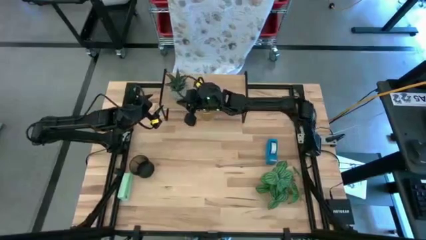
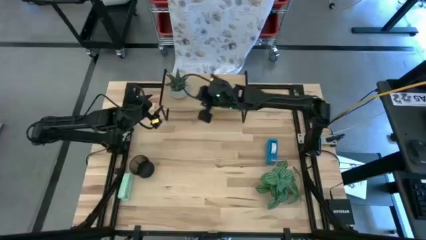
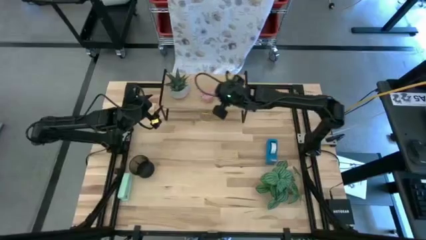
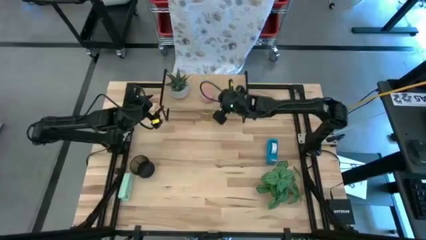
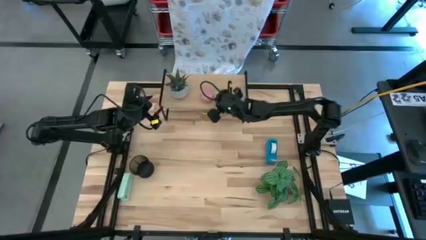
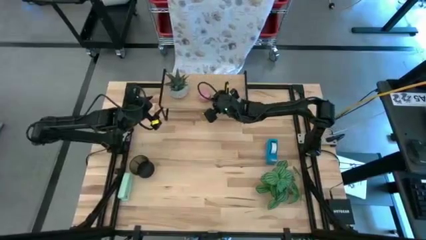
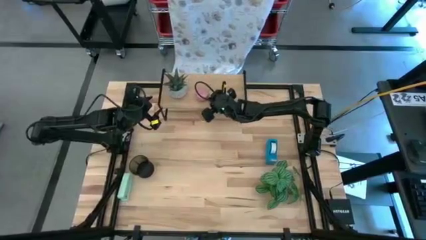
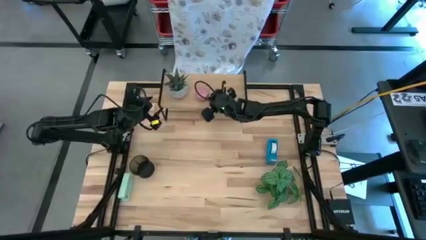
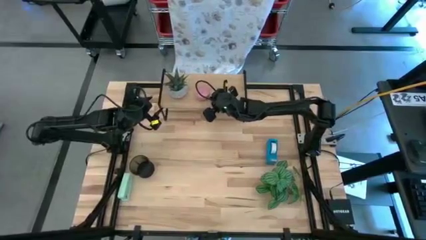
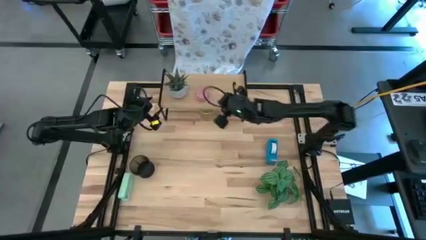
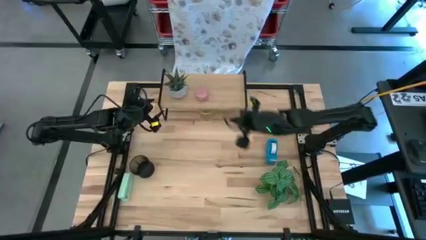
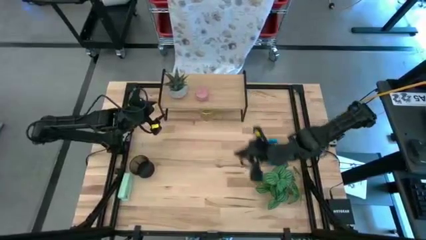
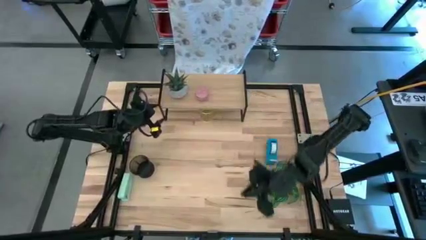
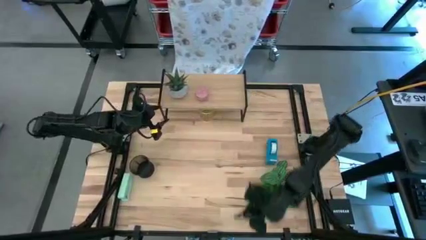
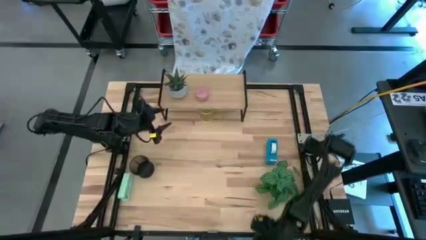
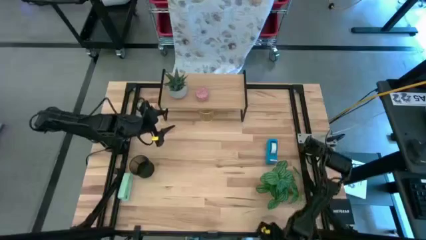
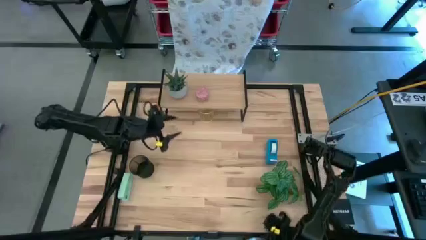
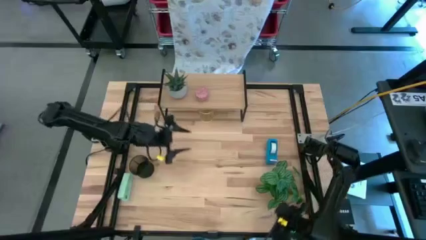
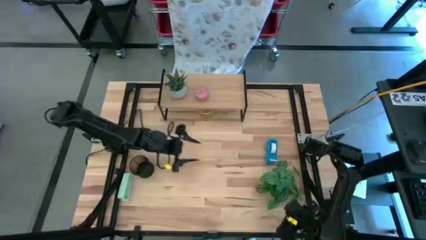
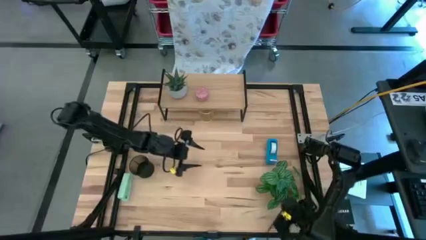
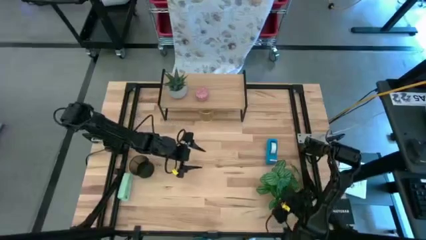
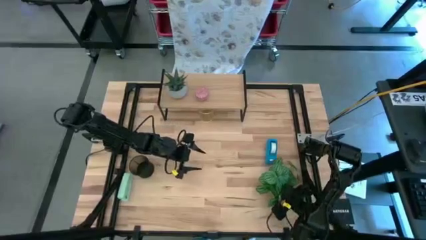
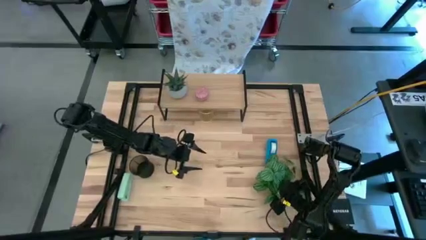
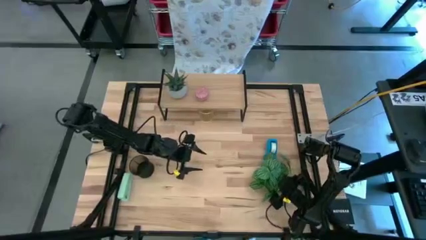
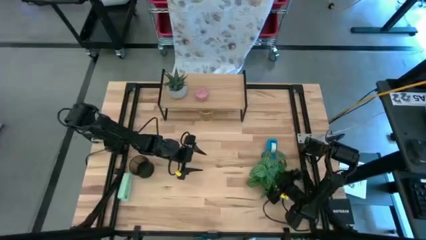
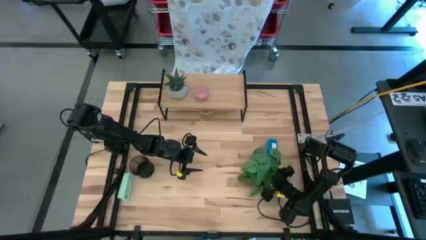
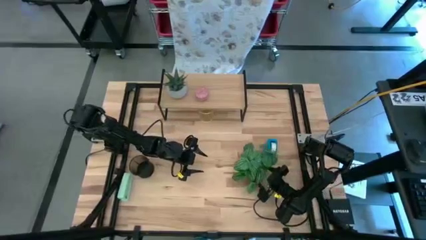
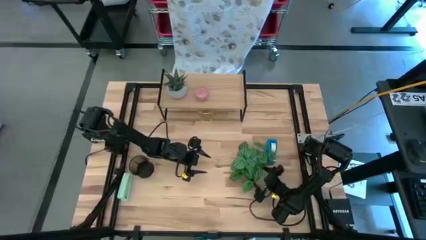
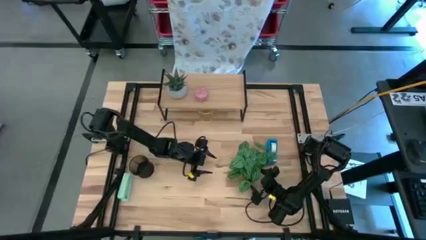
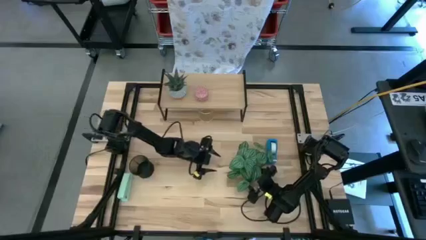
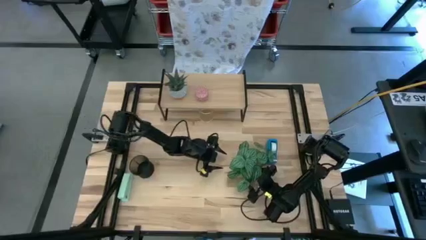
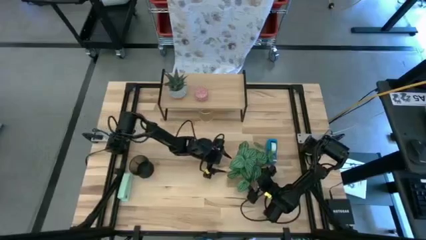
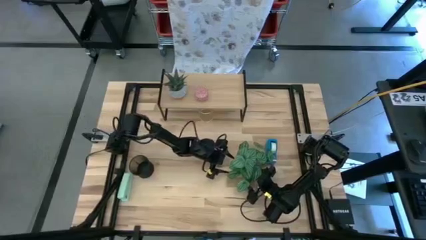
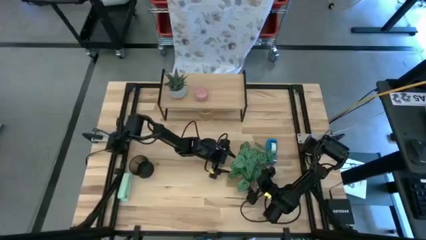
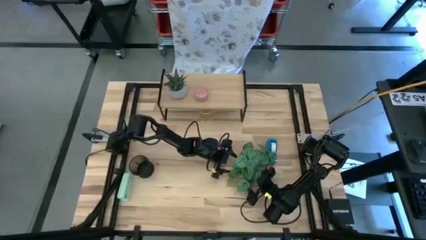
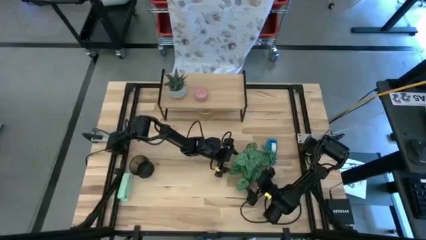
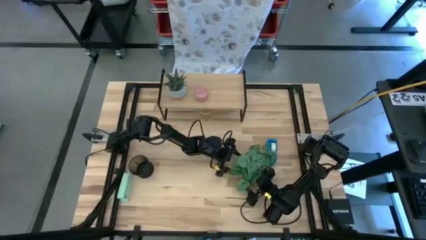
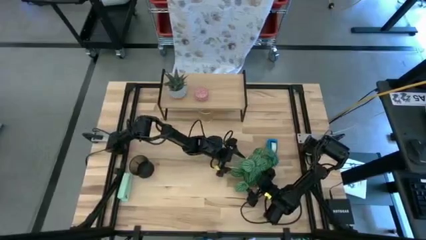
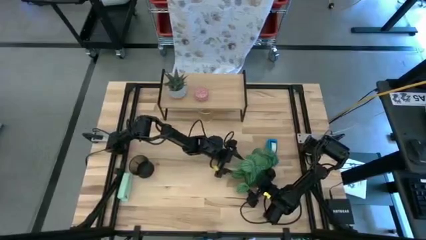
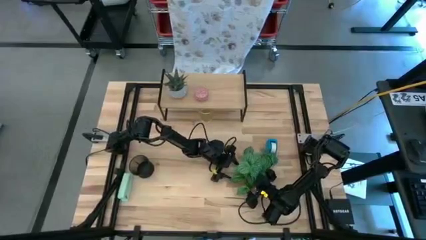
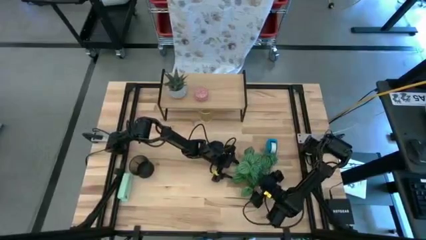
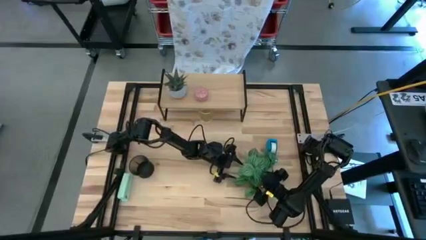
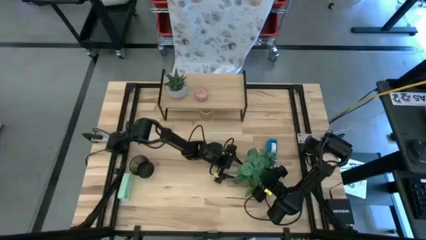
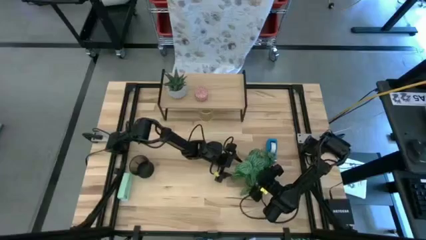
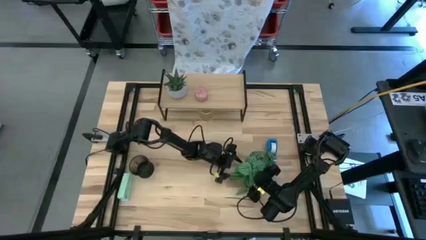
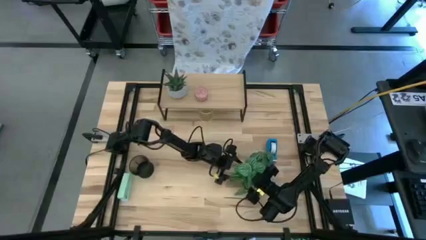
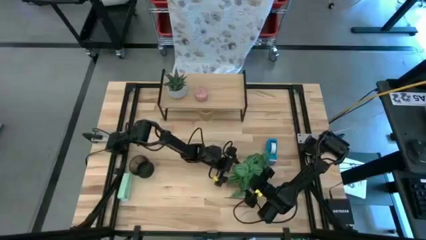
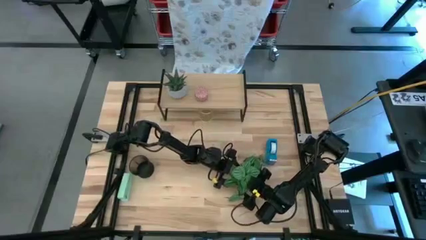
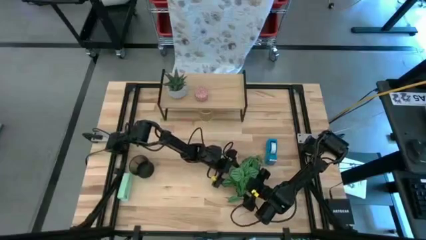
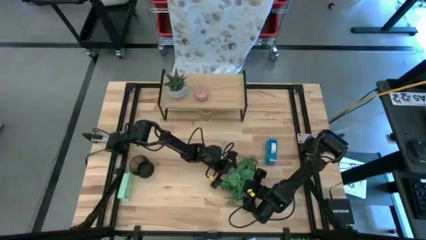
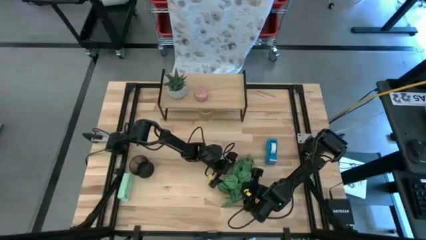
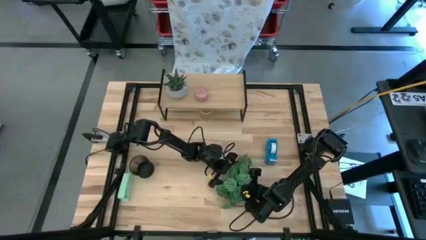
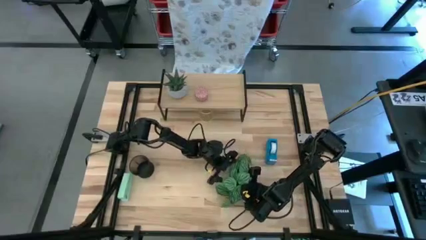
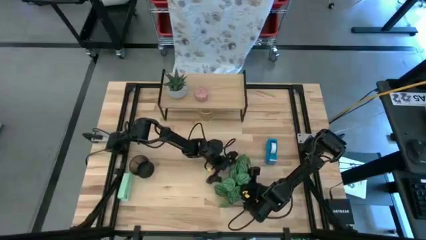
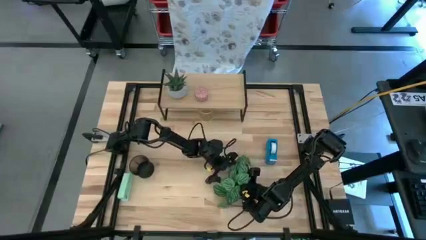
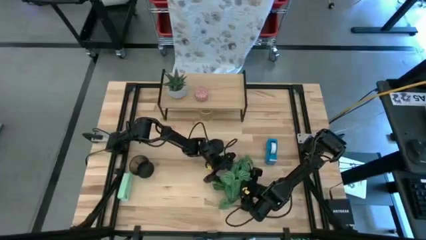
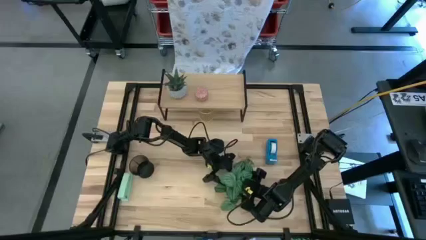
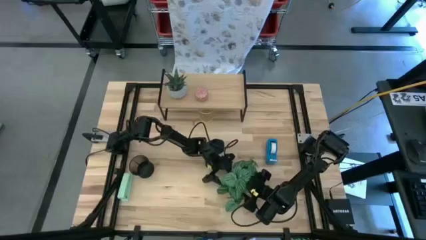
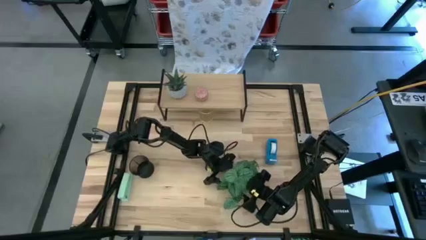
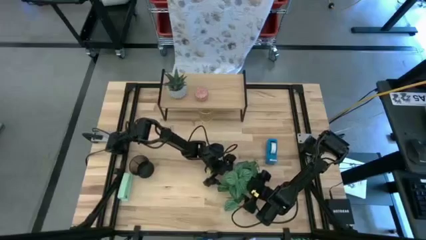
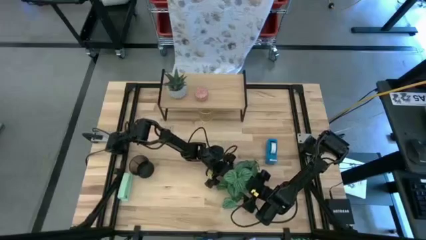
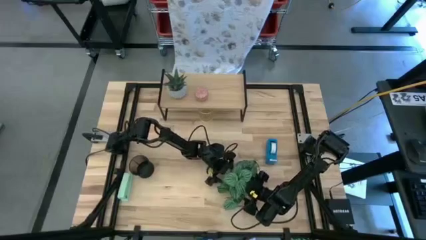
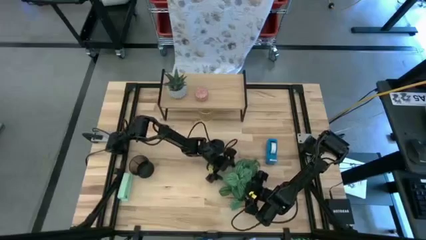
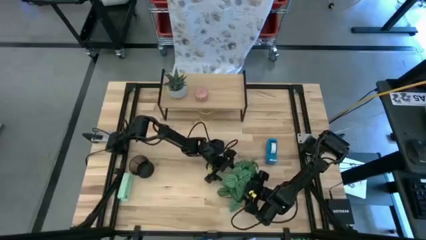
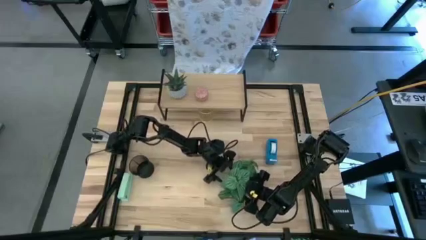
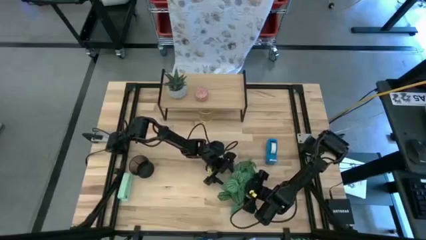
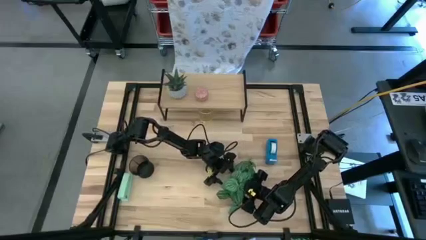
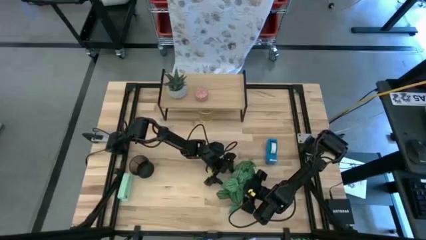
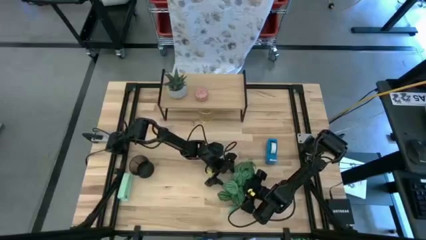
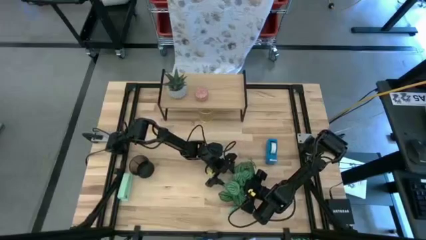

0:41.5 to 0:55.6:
Task: Stock shelves
Put the potted plant on the shelf
